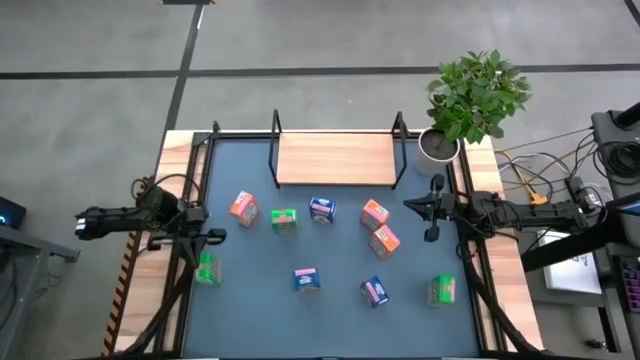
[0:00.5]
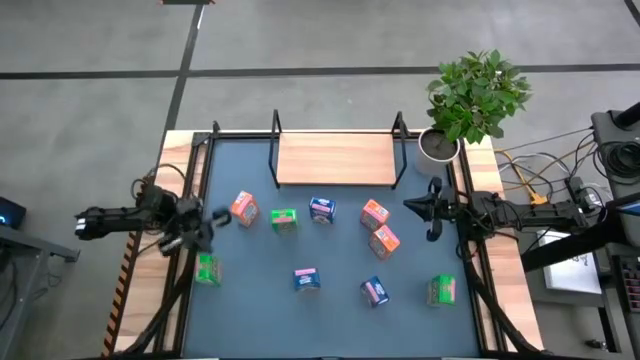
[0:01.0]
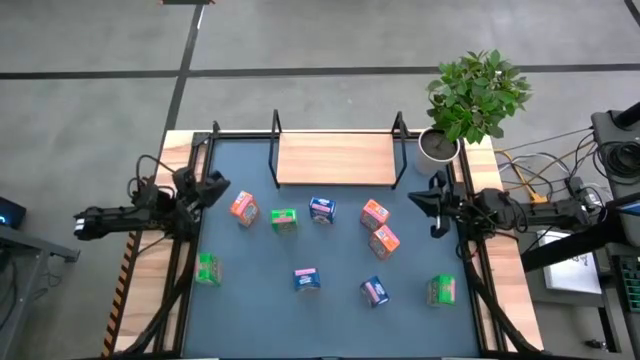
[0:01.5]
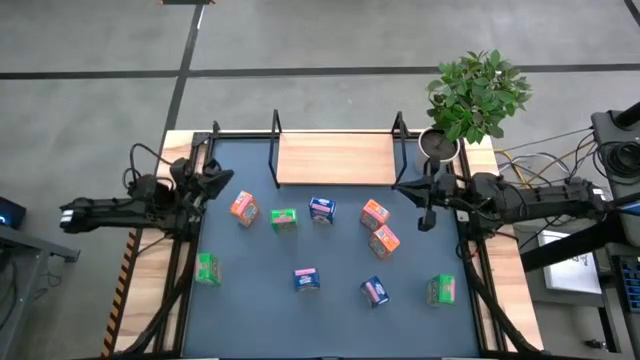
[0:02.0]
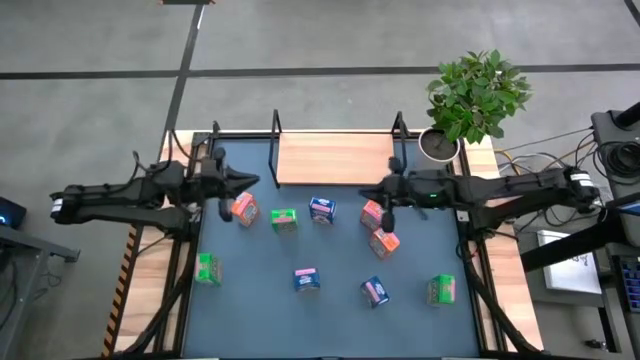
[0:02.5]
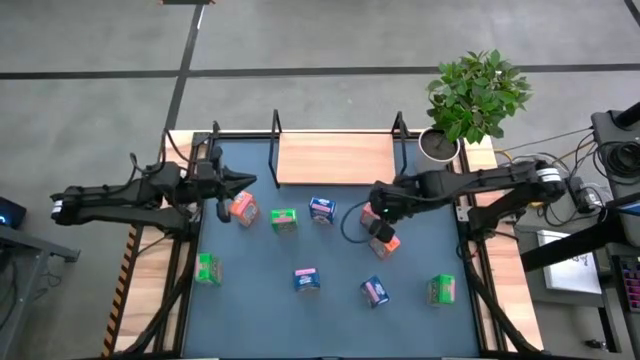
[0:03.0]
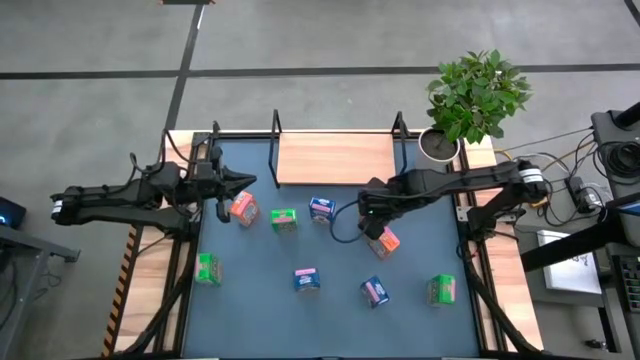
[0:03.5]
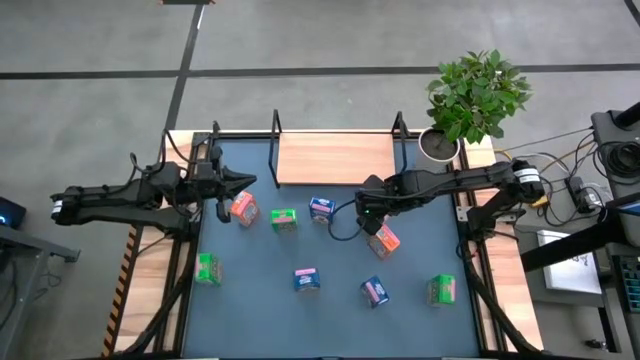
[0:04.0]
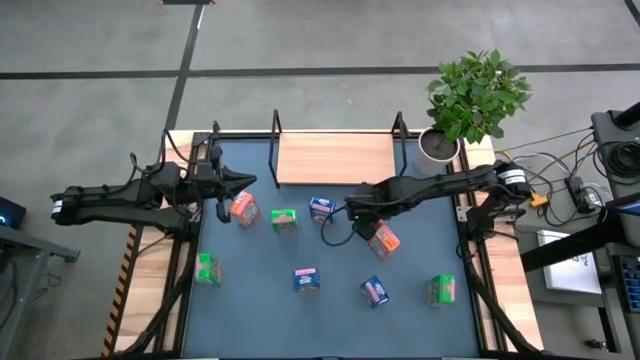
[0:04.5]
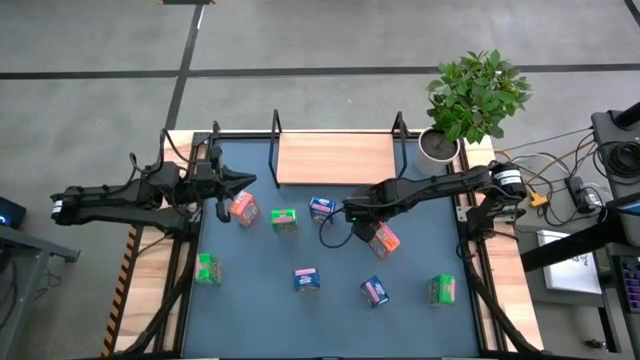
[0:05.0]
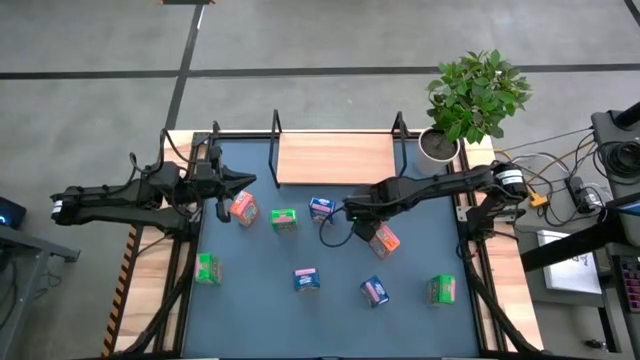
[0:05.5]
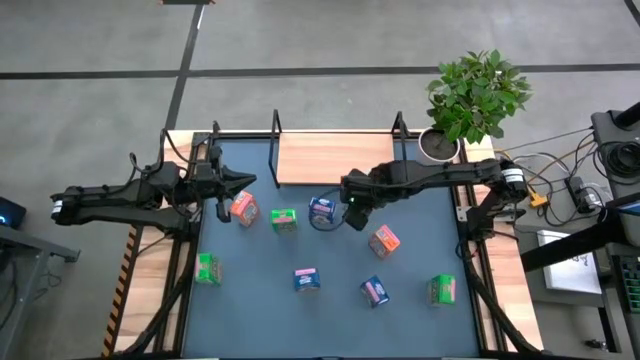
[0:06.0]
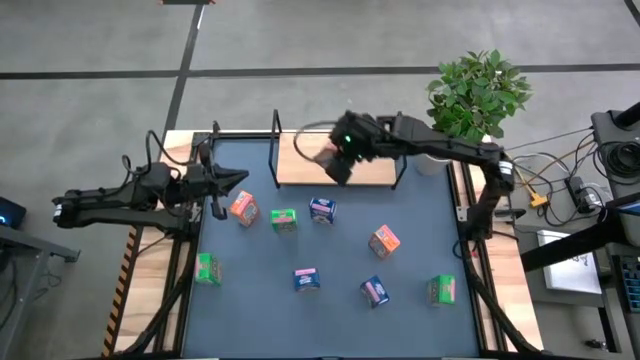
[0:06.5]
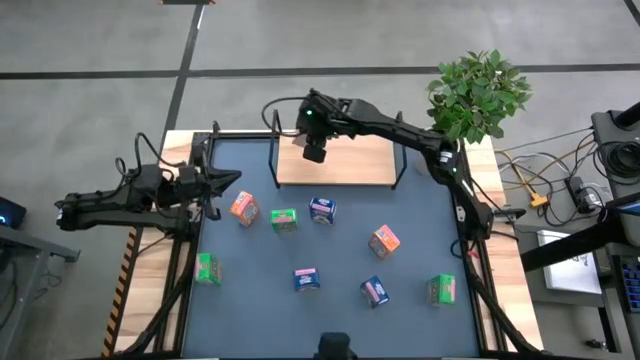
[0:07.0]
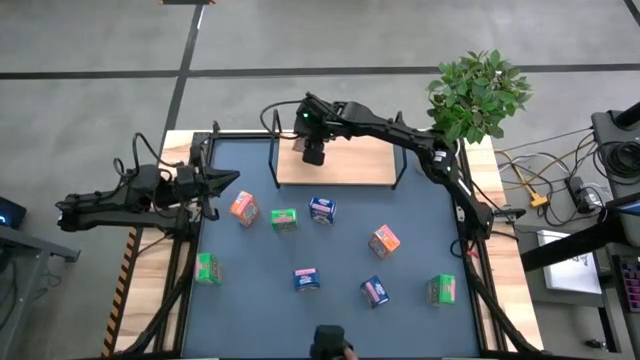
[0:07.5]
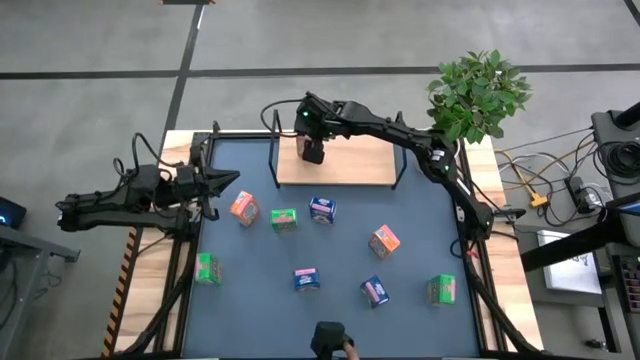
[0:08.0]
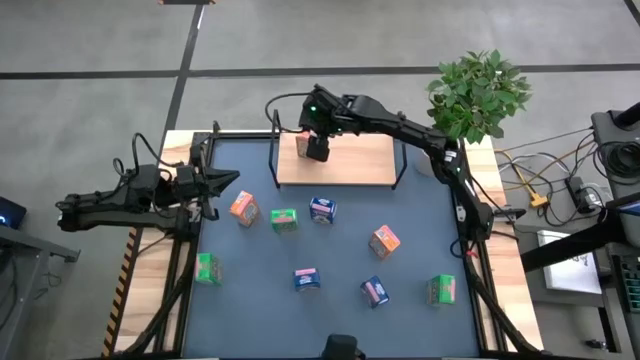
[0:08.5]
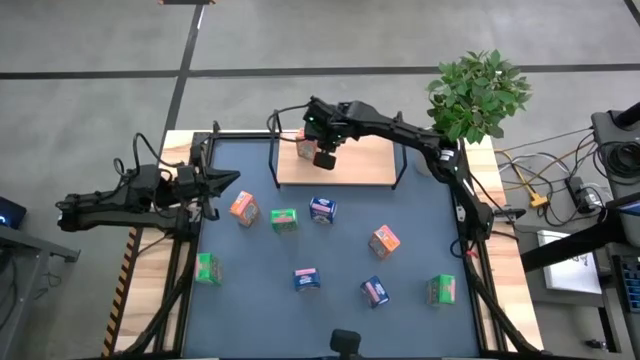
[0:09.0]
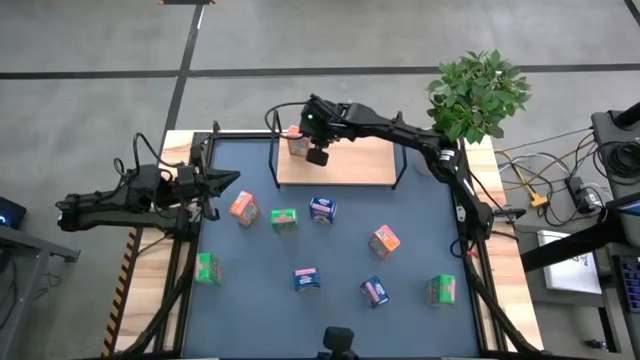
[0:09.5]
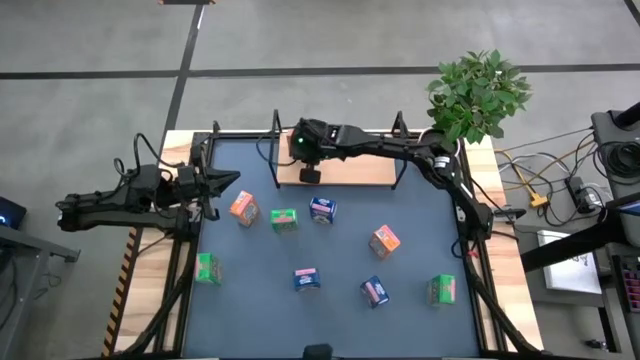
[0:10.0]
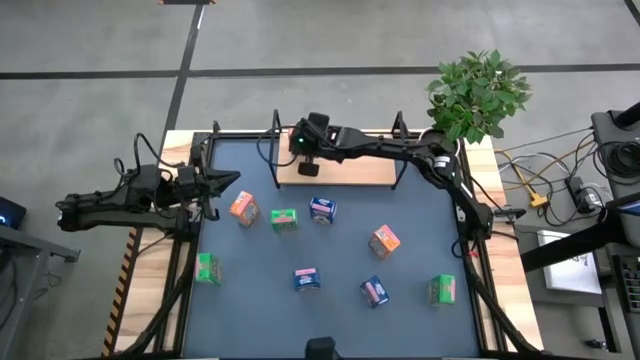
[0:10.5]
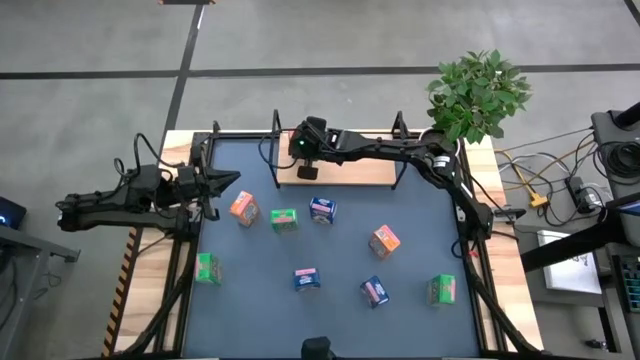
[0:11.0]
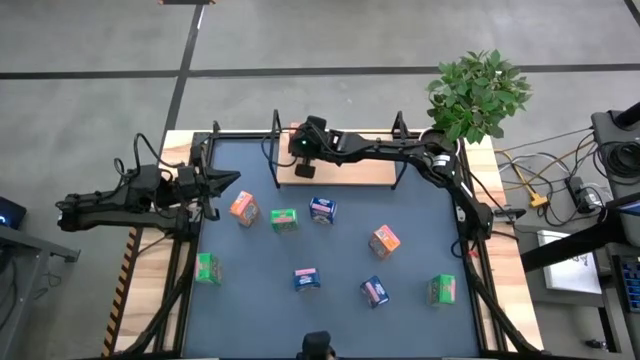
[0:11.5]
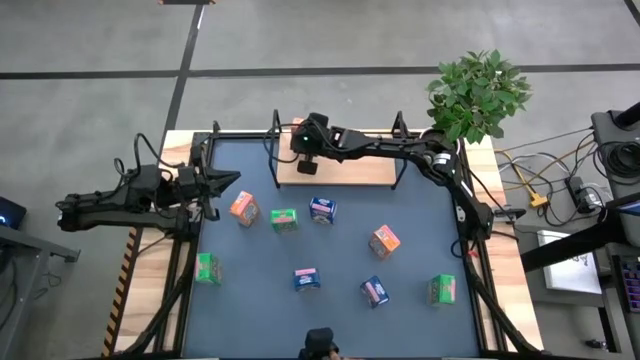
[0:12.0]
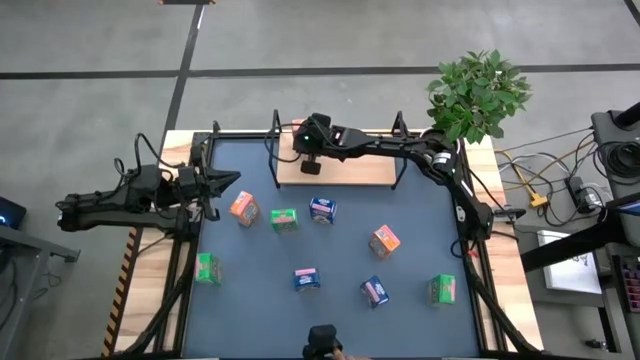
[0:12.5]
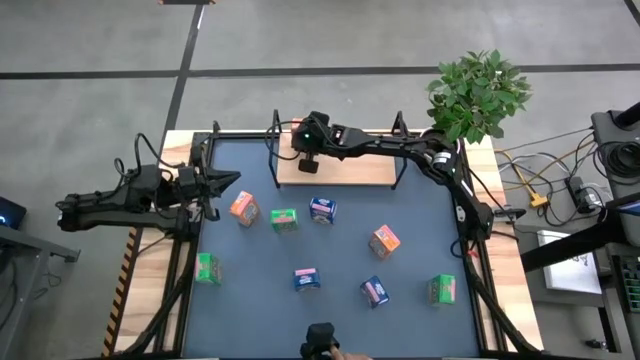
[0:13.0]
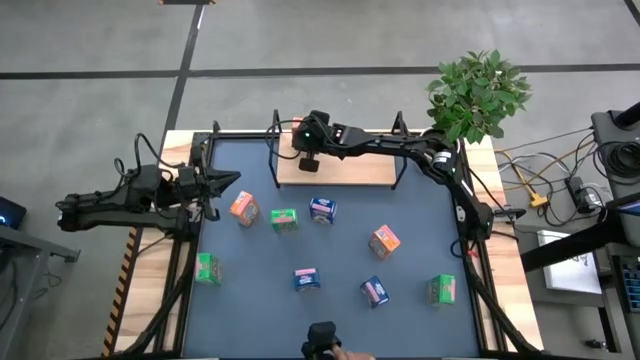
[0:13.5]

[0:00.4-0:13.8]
Task: Stack cereal on shelf
Put the top right orange cereal box on the shelf

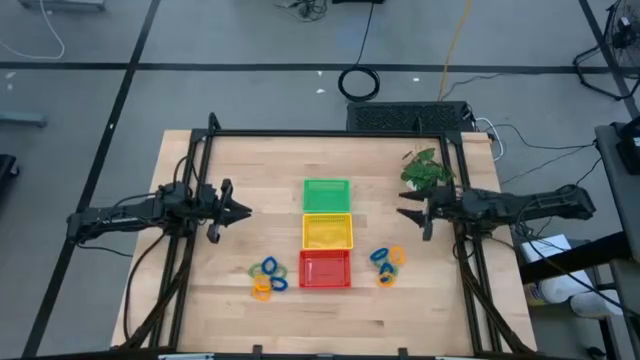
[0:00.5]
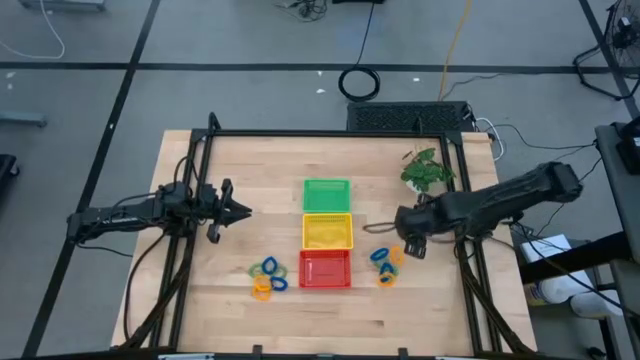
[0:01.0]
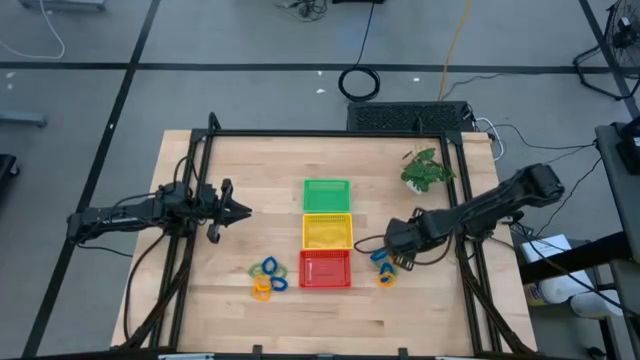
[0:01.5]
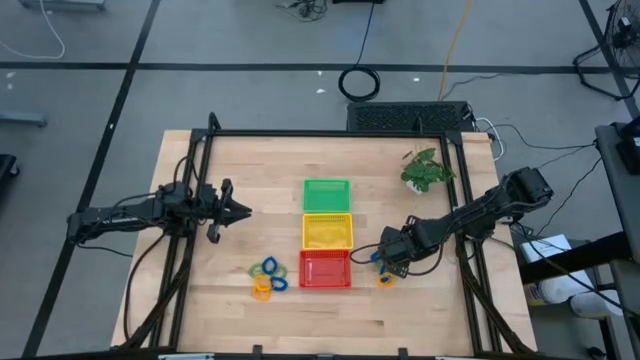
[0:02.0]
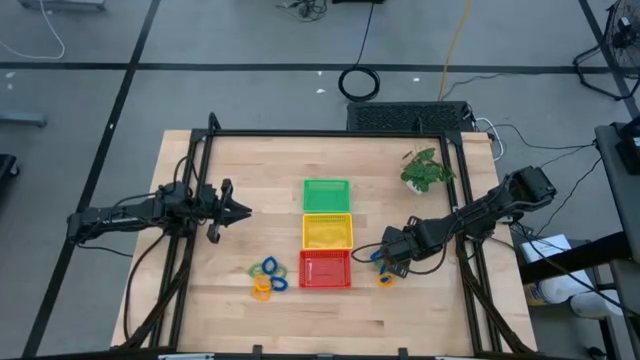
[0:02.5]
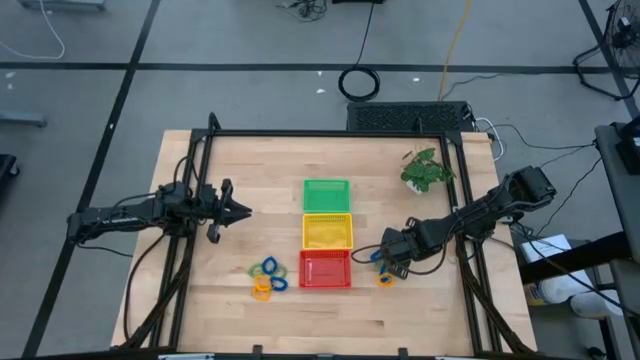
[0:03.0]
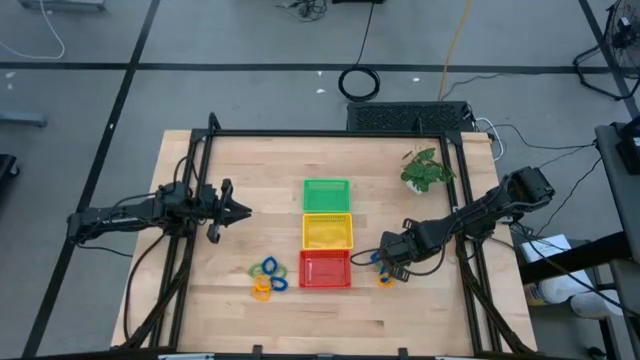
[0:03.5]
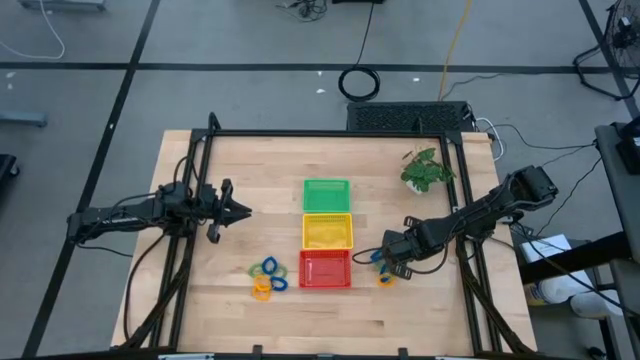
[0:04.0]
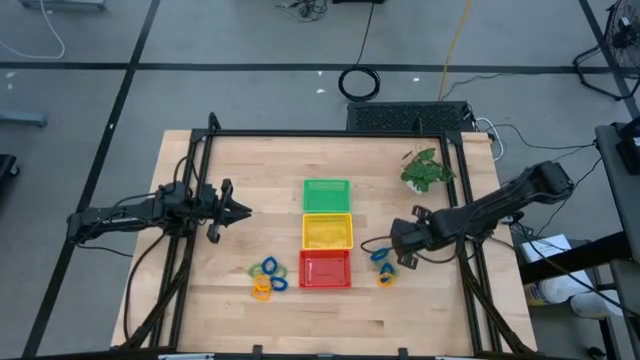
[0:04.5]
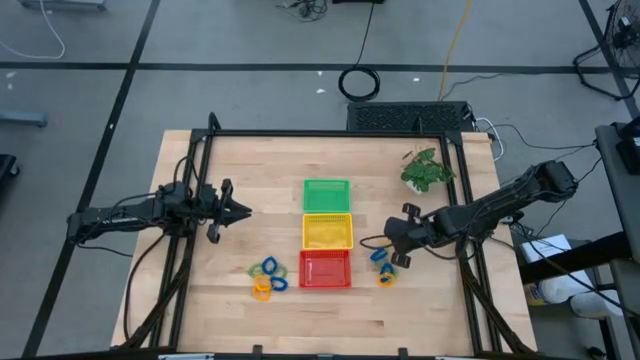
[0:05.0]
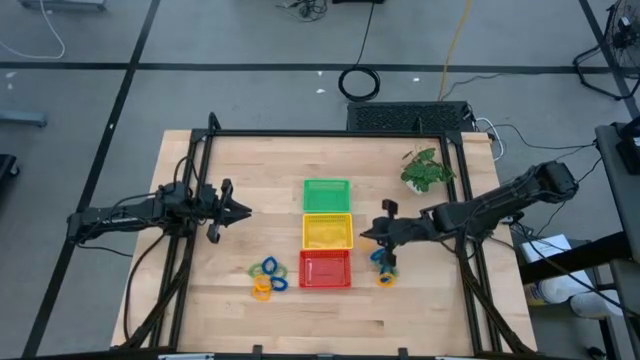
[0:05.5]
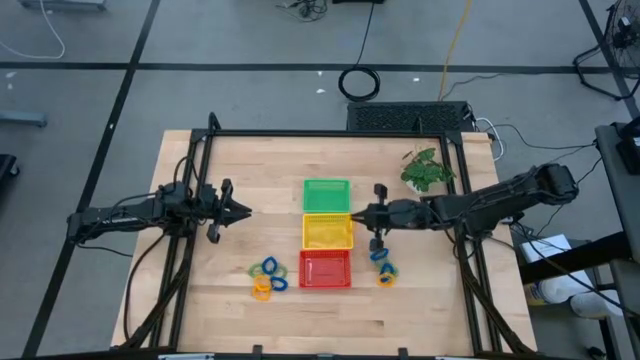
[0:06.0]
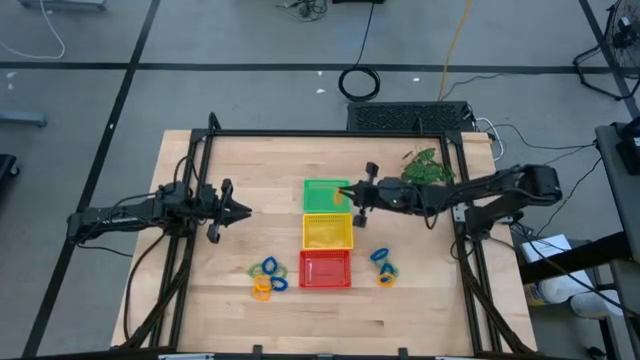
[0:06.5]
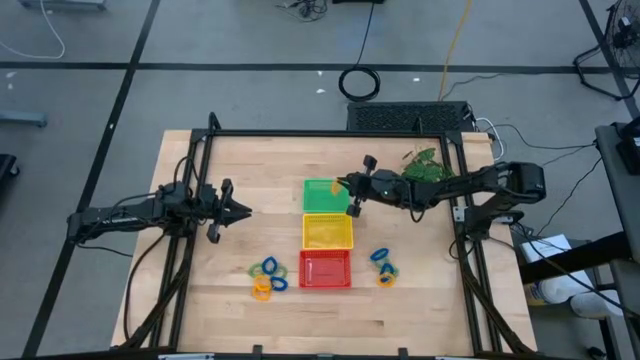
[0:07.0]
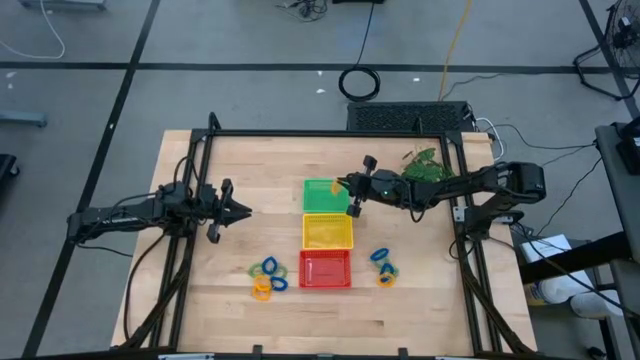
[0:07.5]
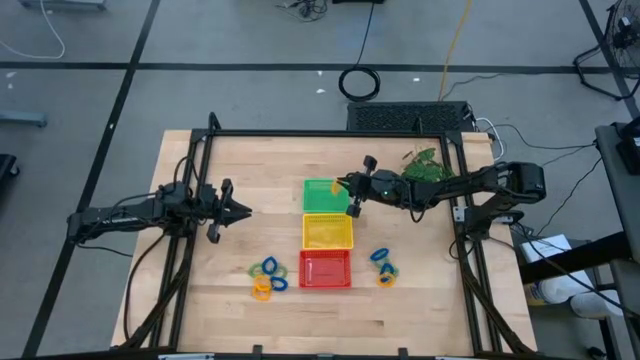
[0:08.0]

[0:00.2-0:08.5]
Task: Sort spring keychains into baskets
Put the yellow spring keychain into the green basket
